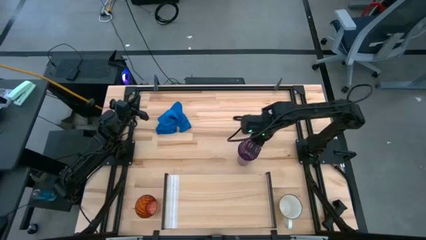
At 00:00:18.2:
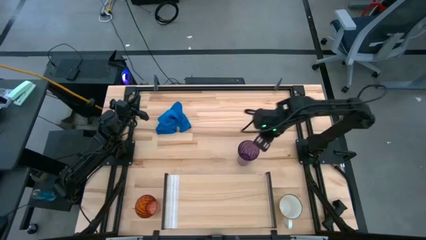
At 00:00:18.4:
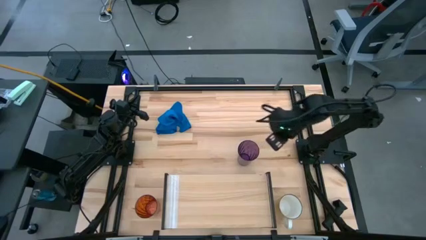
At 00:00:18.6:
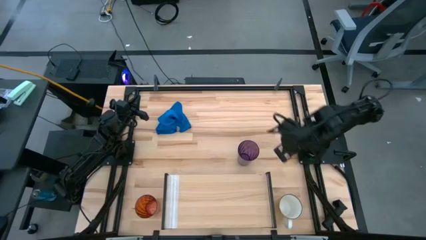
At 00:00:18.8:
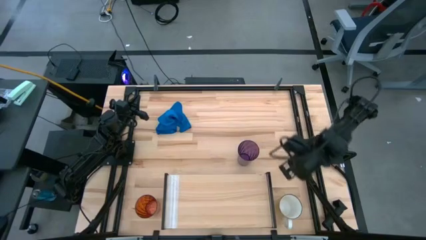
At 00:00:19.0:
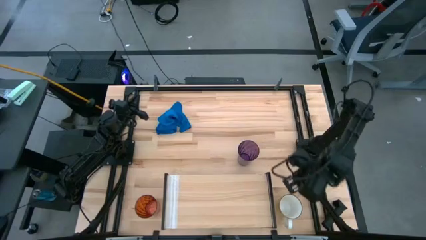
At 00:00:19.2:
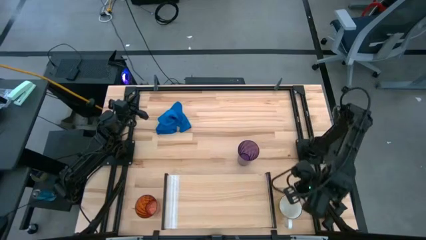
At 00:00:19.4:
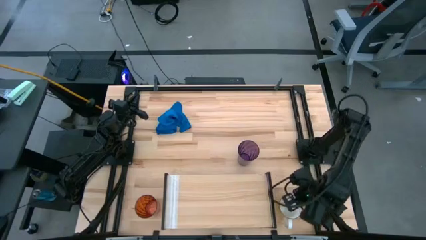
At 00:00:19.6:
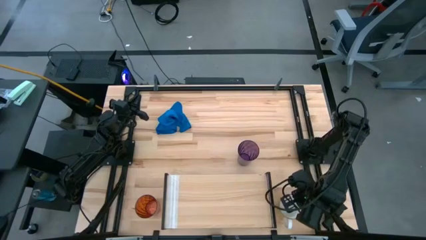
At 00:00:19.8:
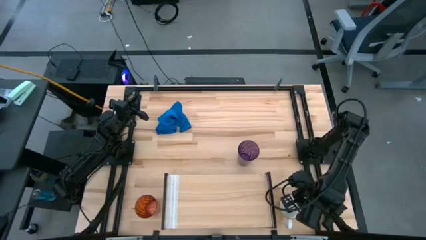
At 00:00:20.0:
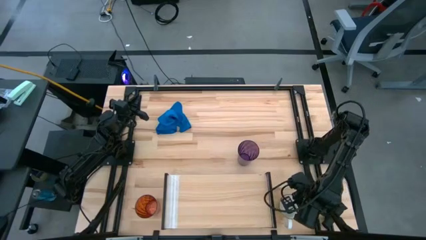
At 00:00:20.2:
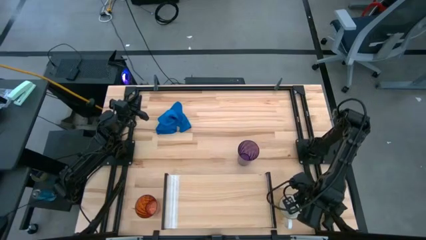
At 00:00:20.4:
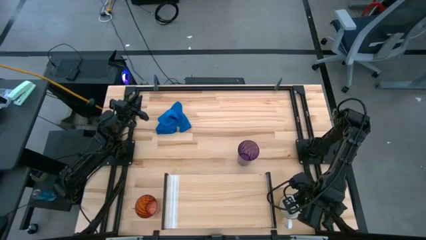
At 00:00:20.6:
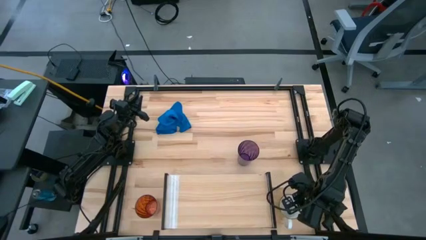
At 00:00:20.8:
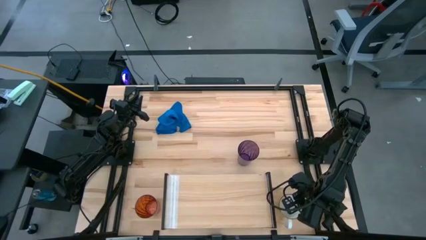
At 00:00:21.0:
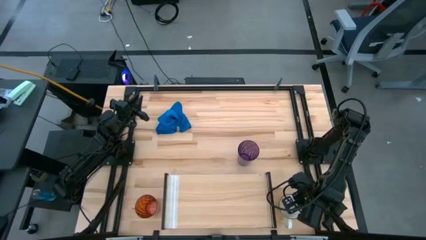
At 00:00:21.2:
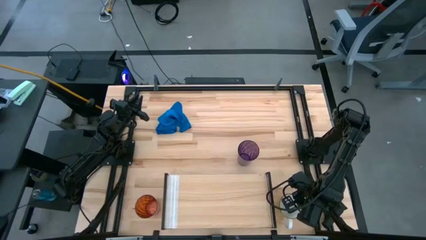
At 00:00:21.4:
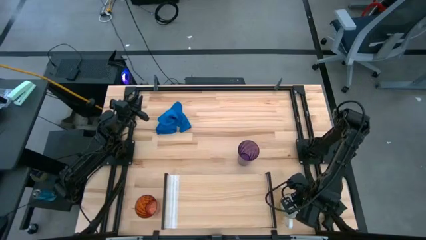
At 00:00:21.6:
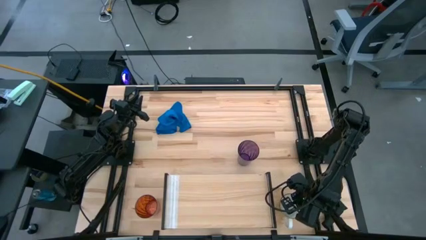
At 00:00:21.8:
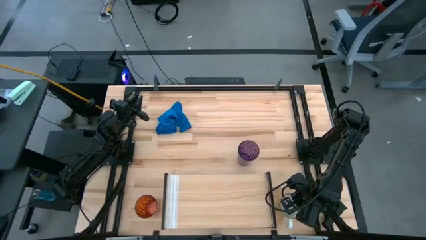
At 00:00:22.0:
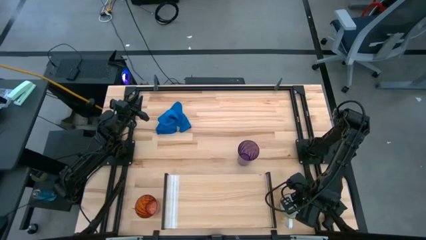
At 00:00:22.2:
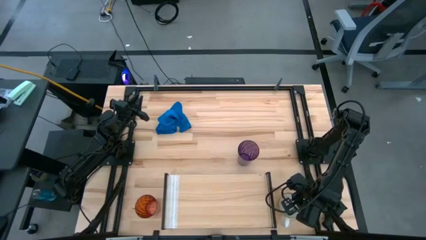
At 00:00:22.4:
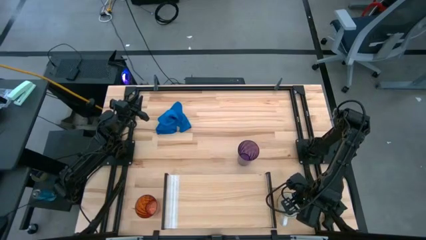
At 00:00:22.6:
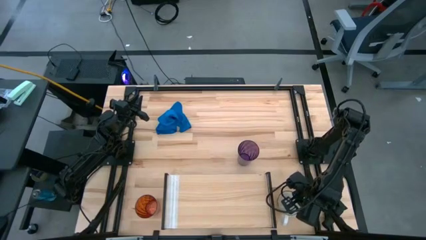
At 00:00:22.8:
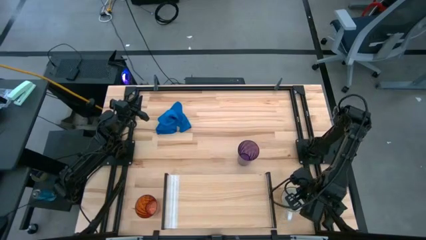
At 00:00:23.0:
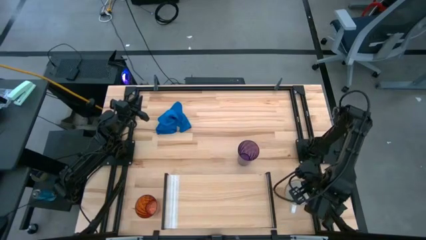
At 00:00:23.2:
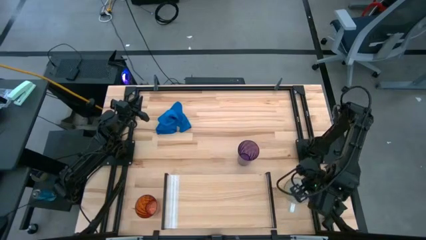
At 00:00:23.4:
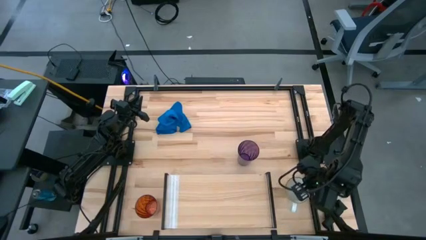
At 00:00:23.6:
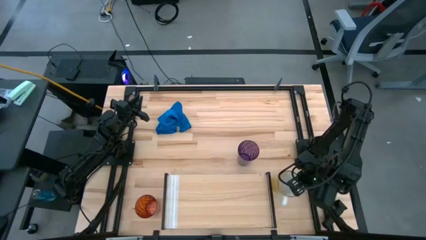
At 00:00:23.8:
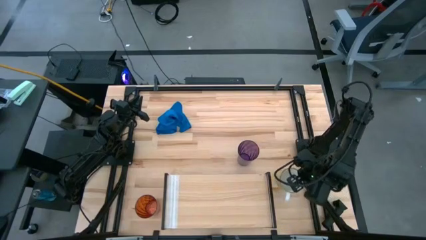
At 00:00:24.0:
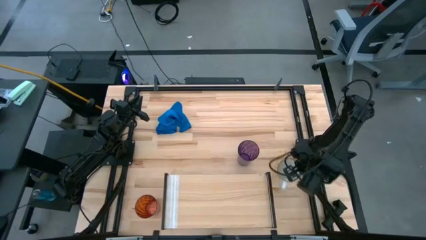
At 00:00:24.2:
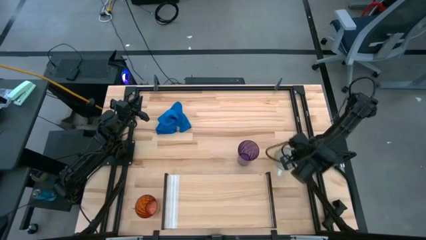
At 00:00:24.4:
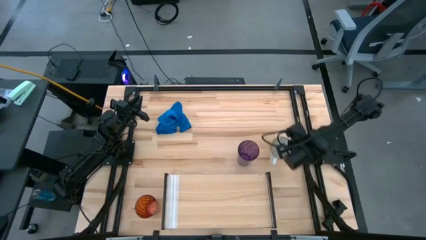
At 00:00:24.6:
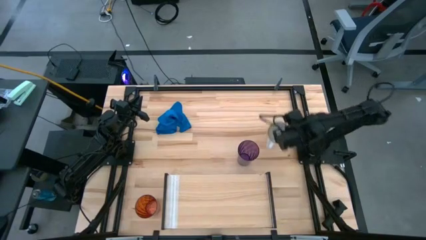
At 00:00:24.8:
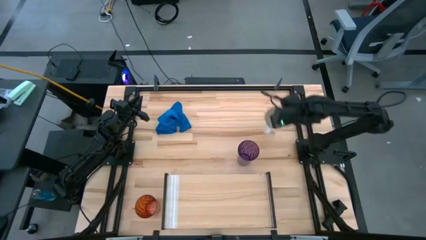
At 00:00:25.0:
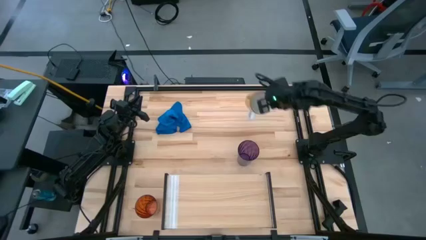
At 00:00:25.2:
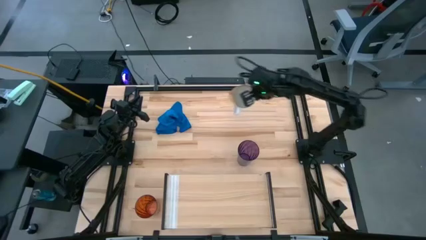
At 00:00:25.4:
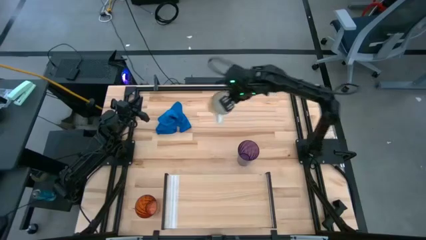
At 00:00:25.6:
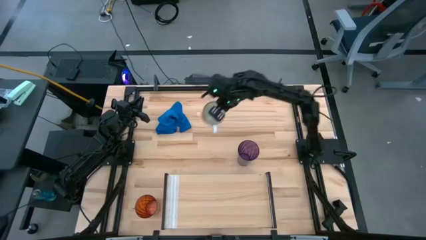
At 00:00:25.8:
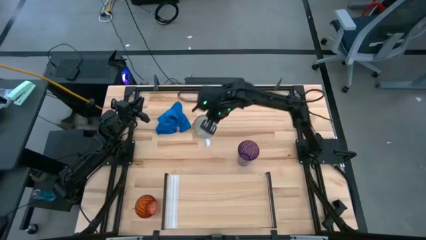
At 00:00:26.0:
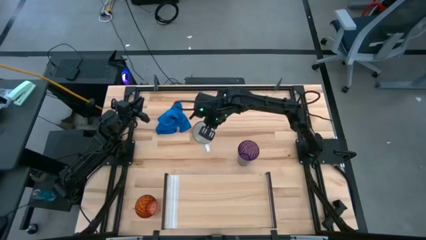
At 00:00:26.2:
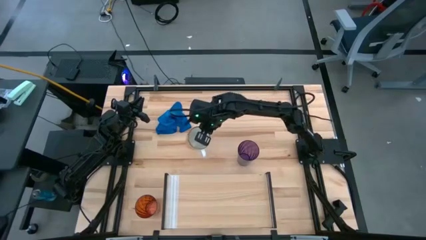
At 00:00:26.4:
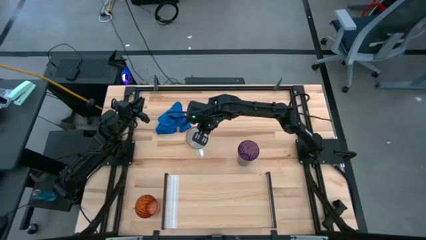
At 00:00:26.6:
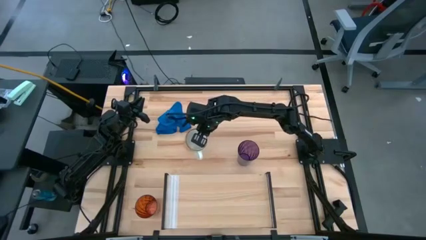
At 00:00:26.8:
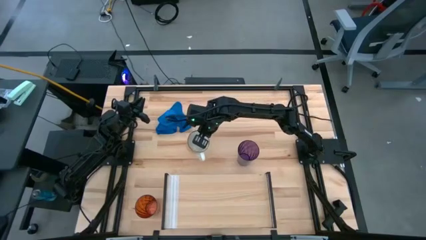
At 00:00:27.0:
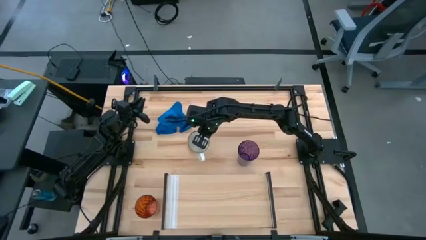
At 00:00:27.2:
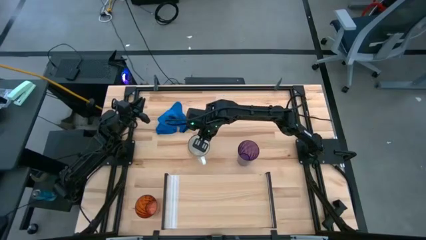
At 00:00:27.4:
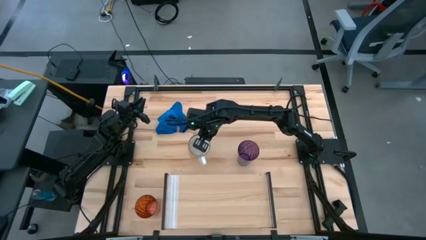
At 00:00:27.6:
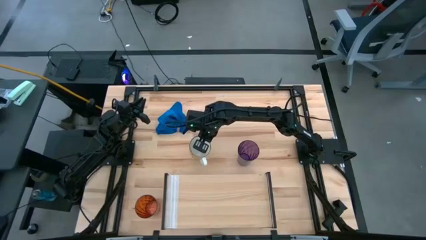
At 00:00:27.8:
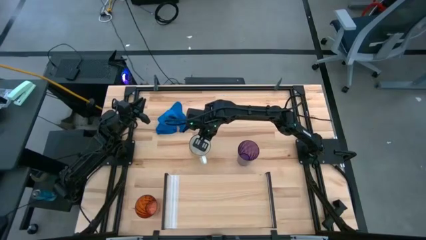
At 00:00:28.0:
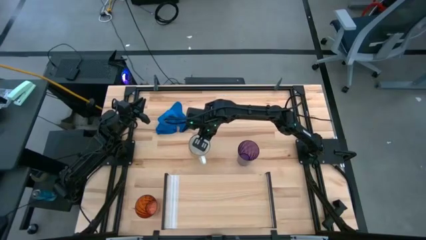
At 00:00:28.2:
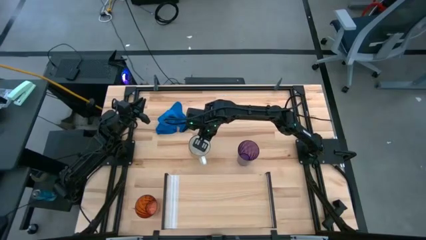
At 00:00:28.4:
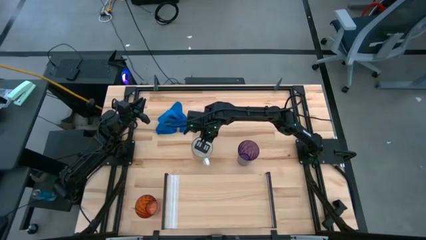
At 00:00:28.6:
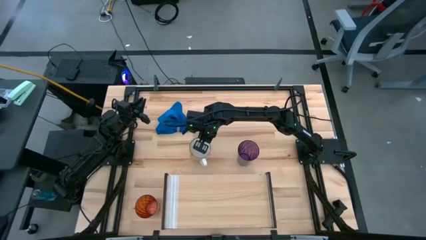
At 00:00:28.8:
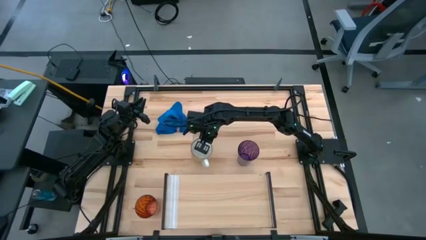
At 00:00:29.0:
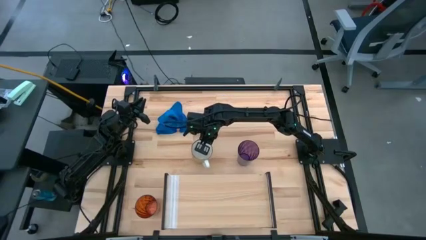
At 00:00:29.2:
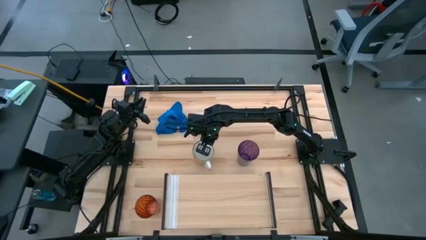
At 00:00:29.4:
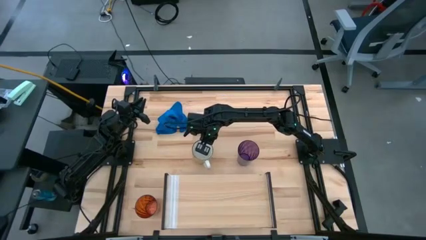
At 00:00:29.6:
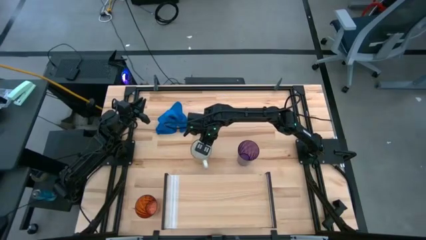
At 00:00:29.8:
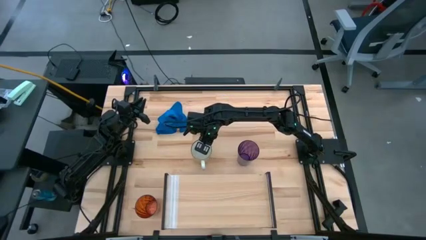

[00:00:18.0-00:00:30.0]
Task: Stack small to large cups/mugs on shelf
Move the yellow mug from the bottom right to the middle of the table

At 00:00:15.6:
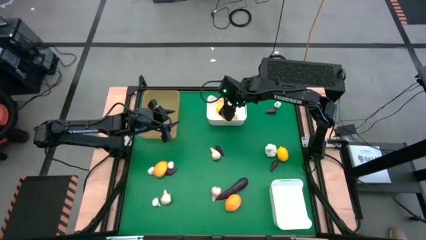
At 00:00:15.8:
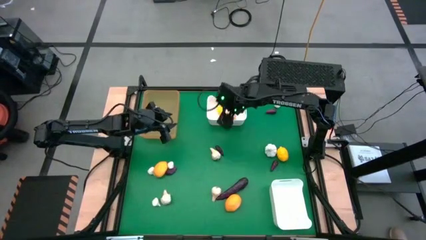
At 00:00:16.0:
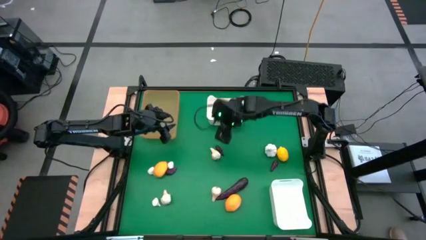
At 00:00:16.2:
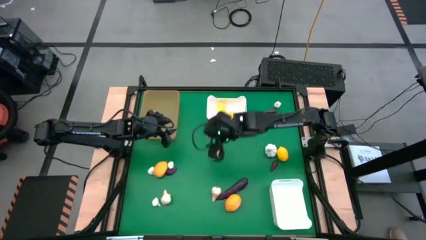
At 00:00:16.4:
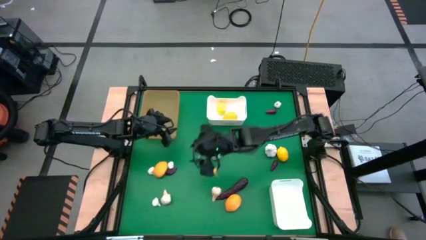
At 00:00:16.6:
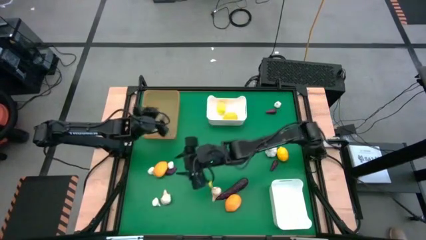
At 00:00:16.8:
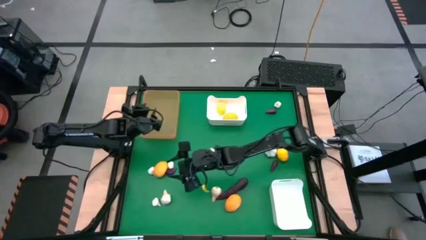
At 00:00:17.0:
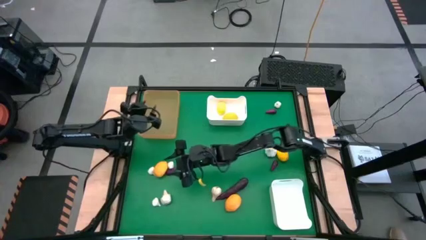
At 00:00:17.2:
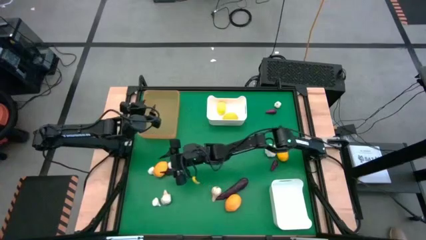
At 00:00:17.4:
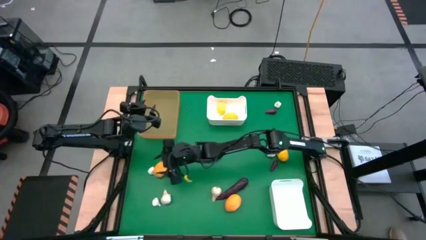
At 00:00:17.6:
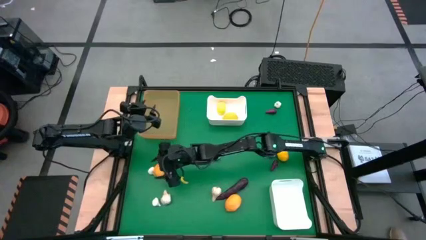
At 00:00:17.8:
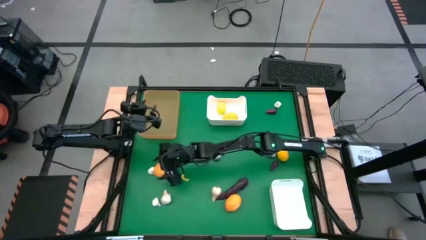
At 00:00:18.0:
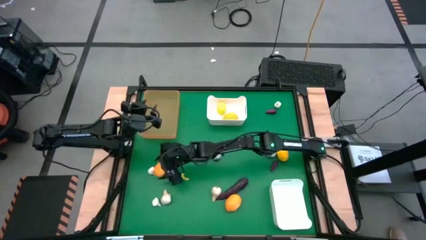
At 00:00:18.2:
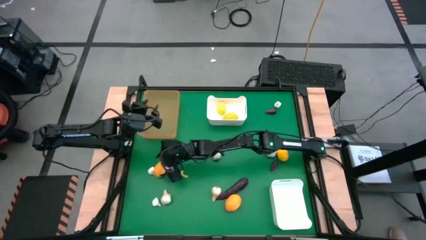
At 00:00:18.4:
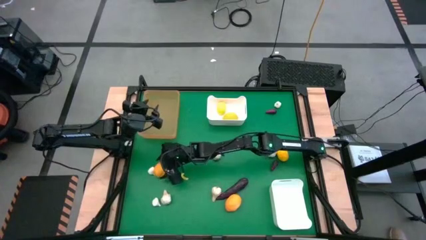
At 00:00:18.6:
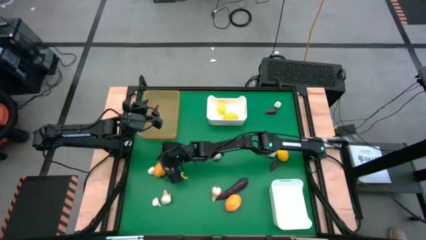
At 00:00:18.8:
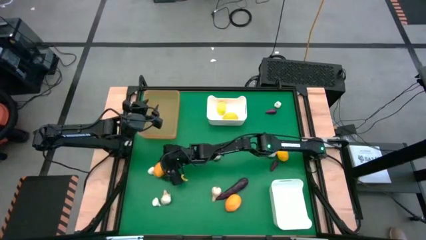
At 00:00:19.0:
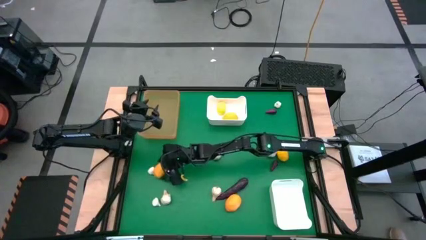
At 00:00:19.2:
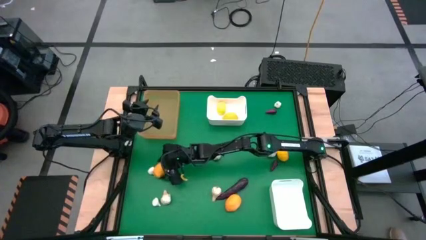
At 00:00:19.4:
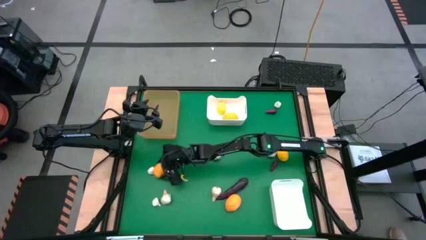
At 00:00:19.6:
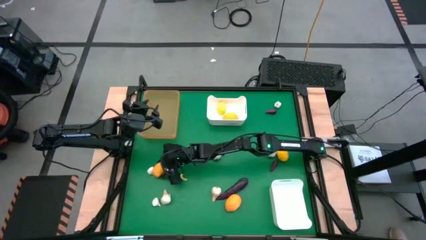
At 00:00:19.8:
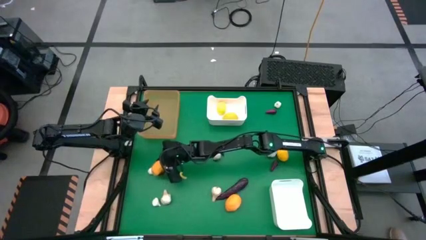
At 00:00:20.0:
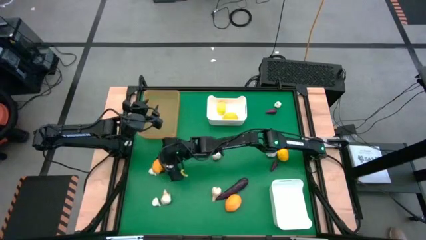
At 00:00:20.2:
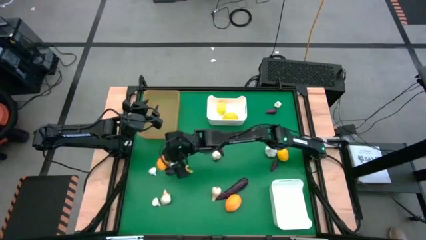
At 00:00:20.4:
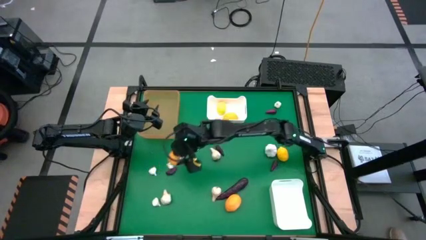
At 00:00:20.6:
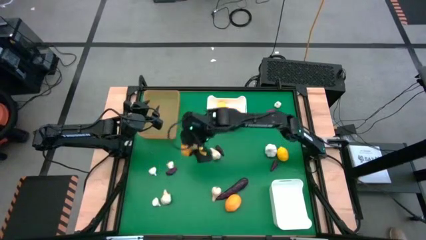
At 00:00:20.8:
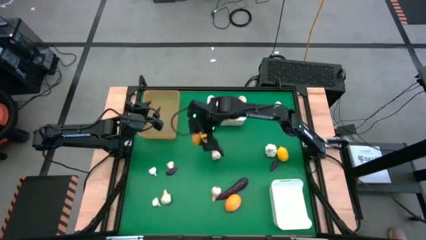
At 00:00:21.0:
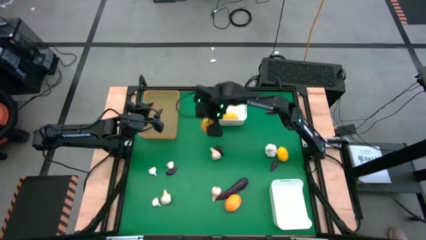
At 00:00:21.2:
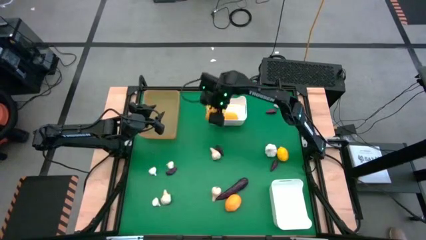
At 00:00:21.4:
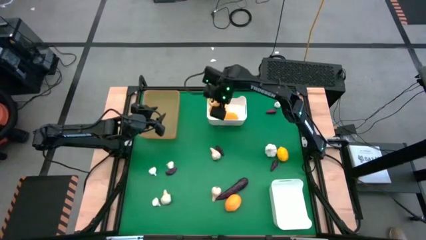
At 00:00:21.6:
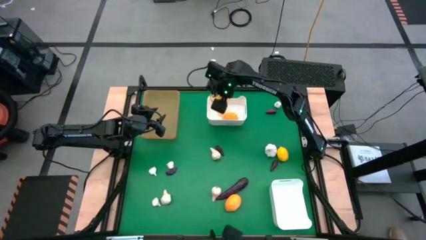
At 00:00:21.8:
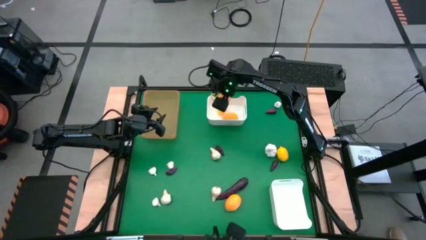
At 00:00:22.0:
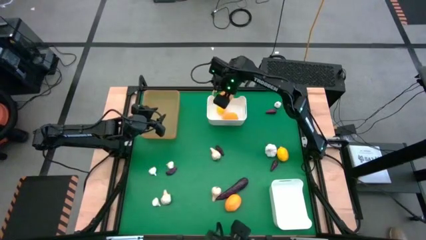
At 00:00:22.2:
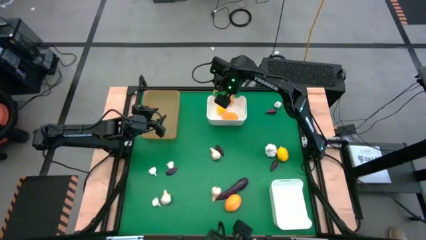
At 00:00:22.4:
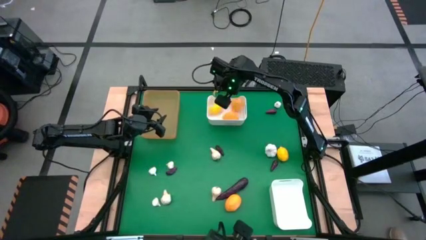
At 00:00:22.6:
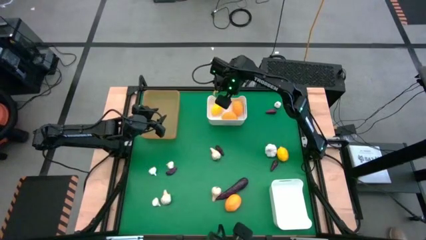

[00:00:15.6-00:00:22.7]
Task: Sort produce into baskets
Put the lemon into the top white bin
